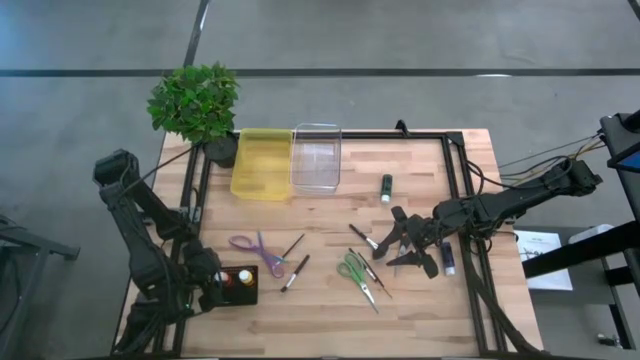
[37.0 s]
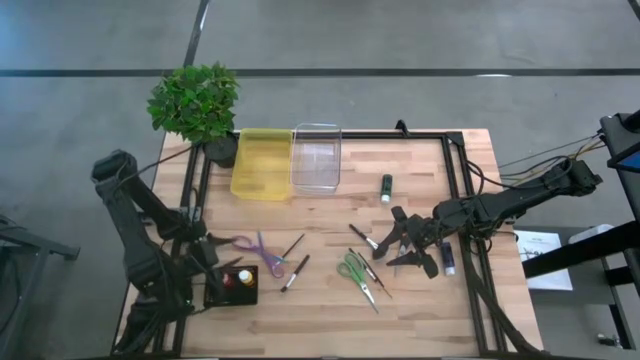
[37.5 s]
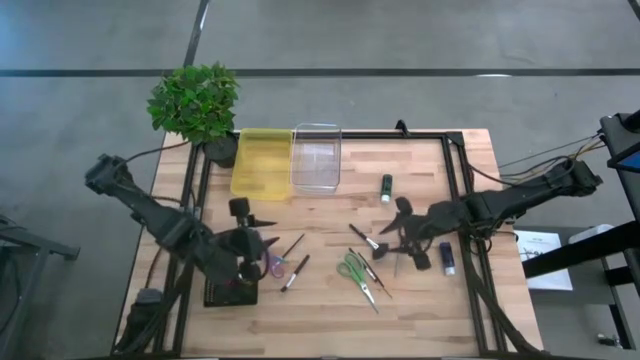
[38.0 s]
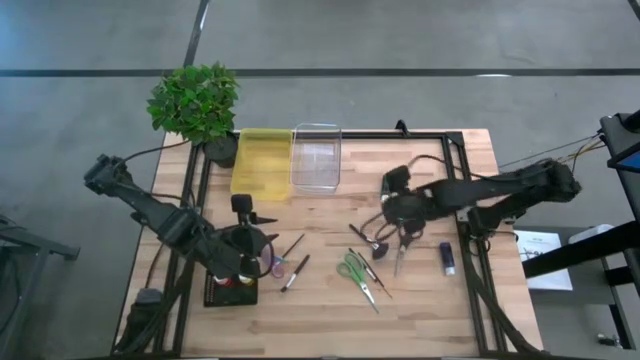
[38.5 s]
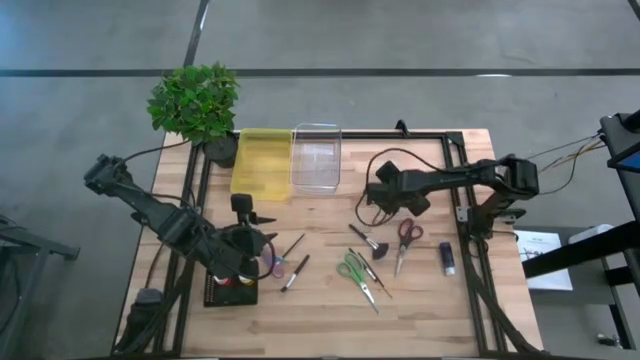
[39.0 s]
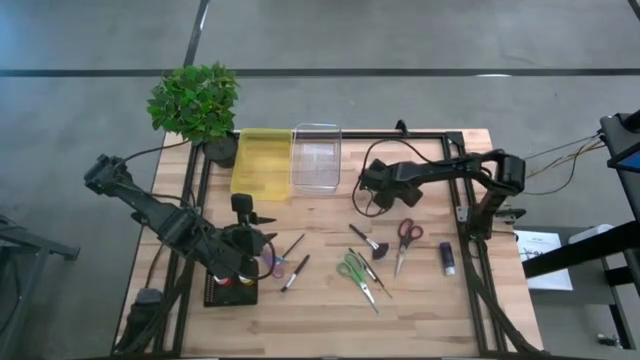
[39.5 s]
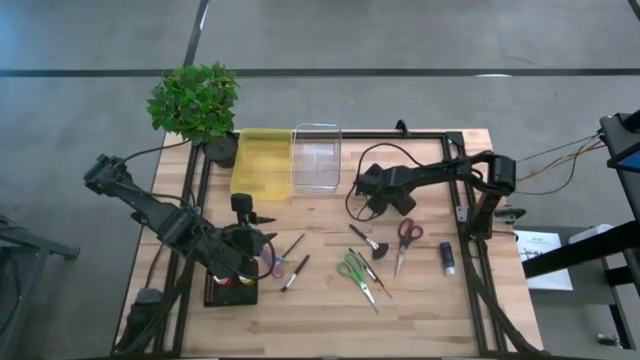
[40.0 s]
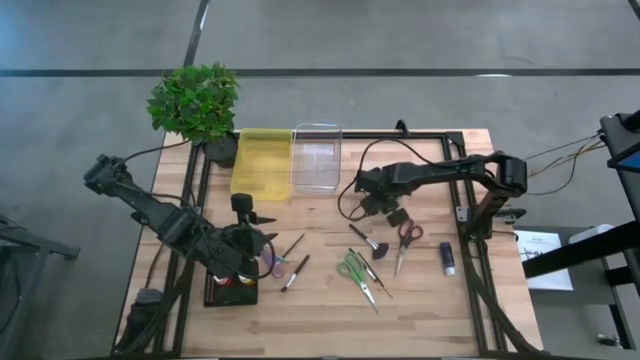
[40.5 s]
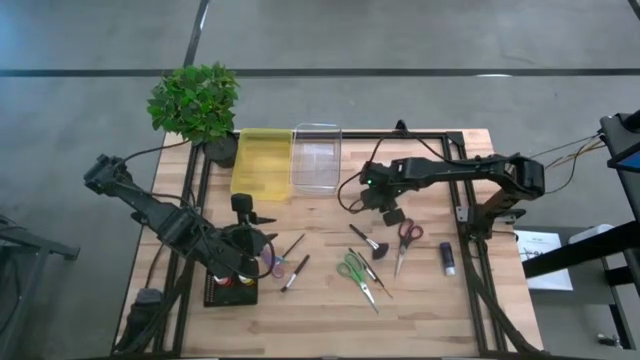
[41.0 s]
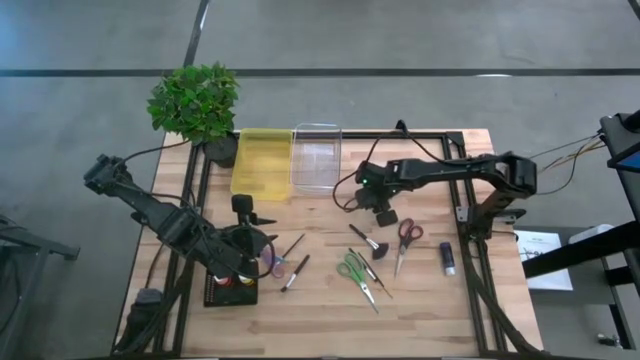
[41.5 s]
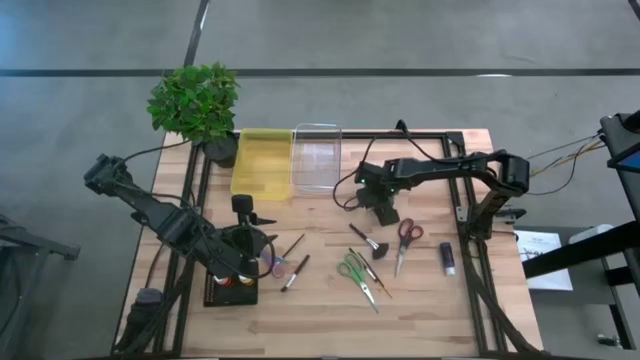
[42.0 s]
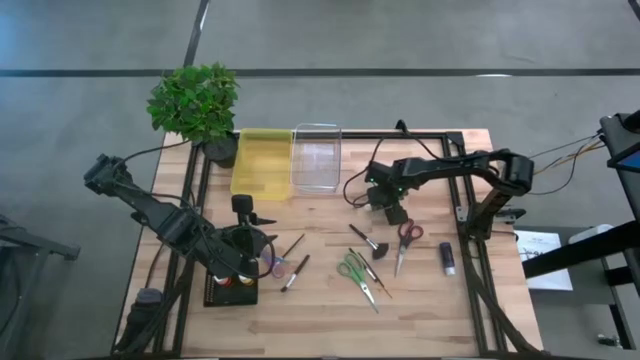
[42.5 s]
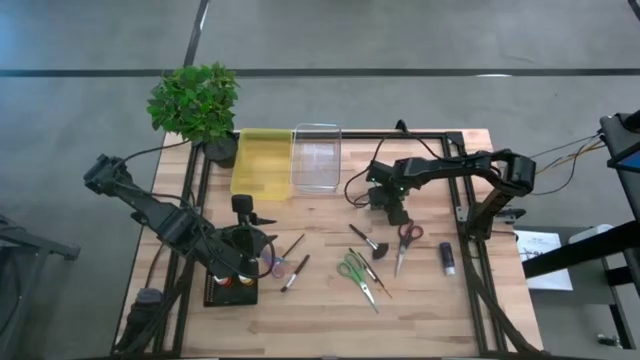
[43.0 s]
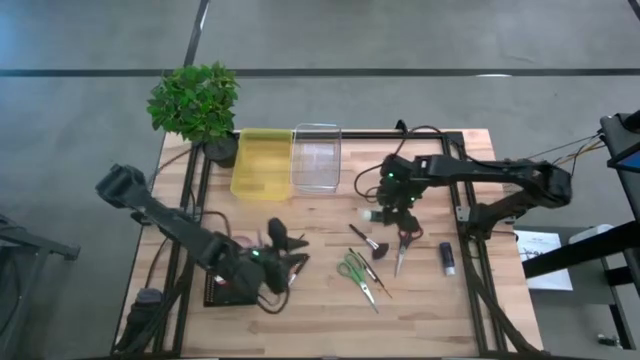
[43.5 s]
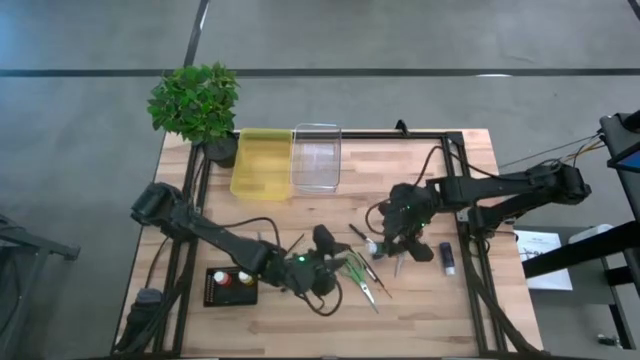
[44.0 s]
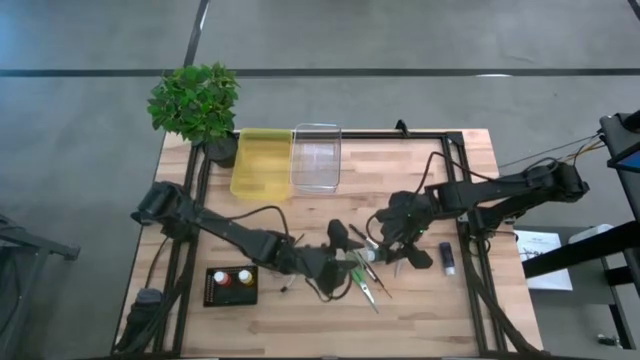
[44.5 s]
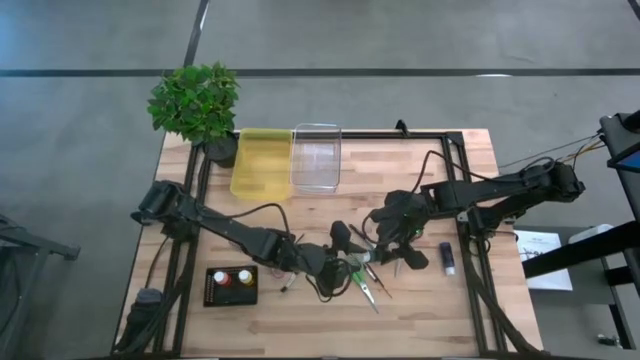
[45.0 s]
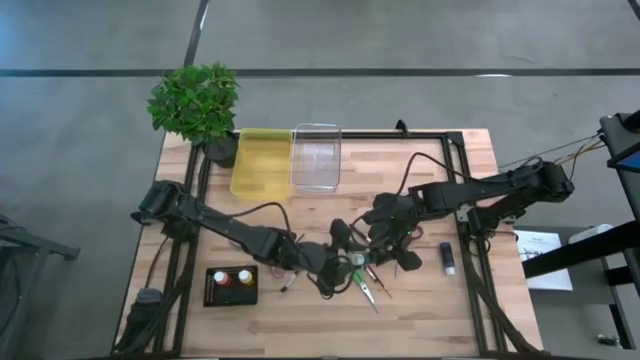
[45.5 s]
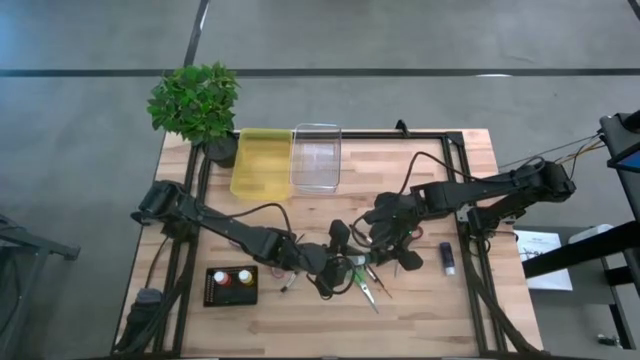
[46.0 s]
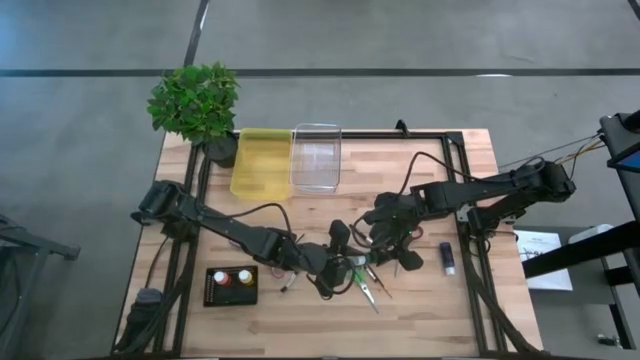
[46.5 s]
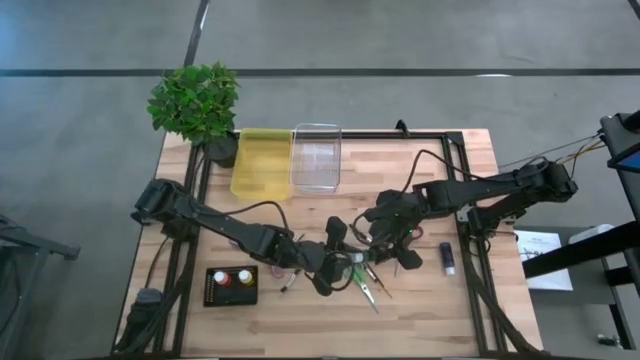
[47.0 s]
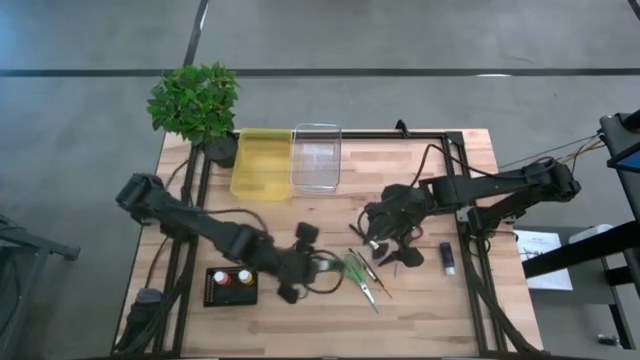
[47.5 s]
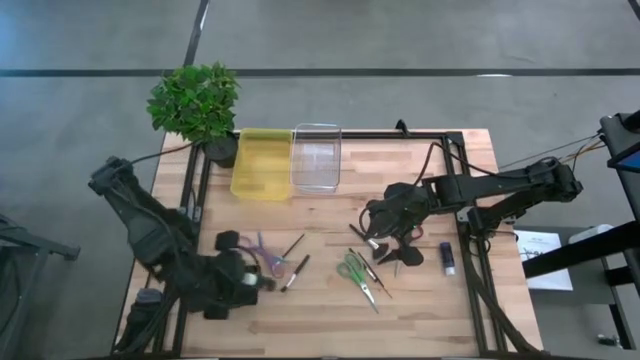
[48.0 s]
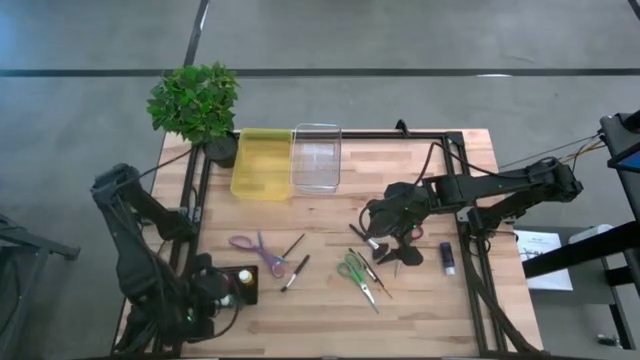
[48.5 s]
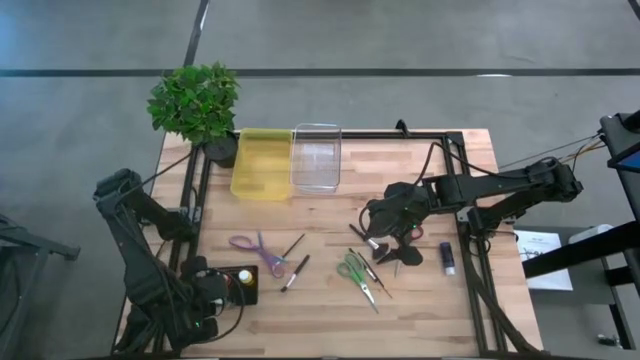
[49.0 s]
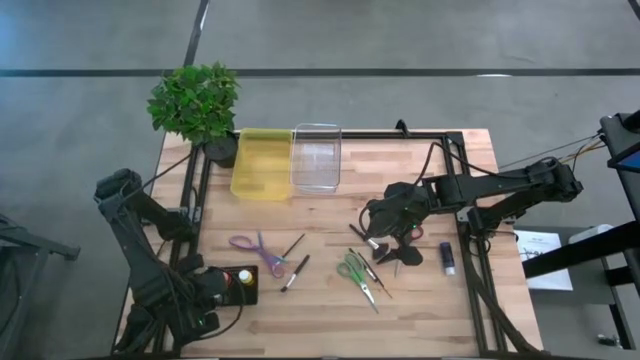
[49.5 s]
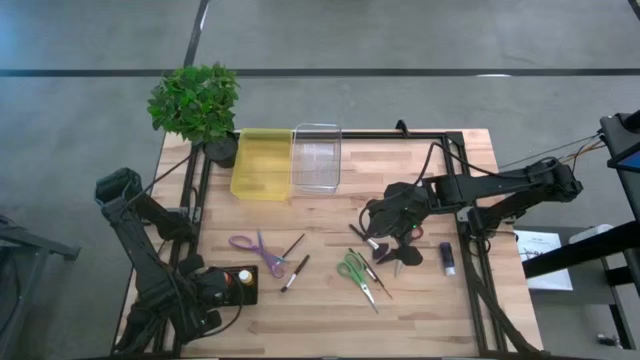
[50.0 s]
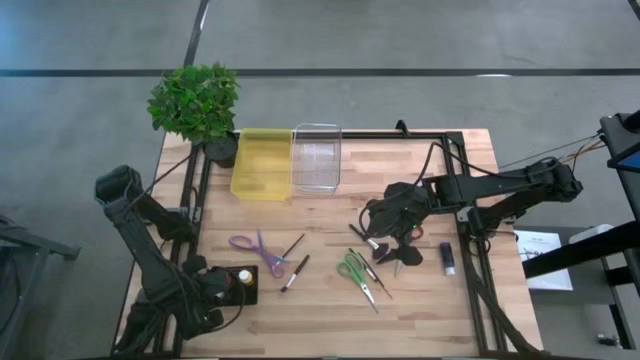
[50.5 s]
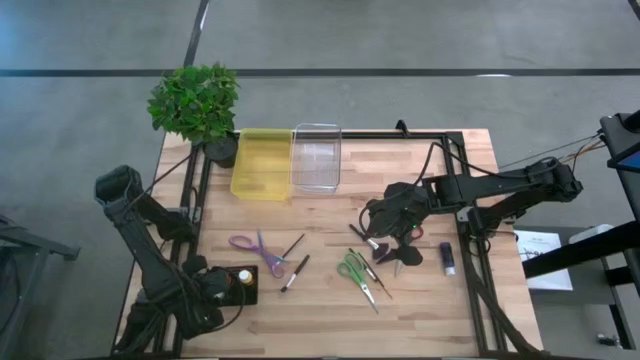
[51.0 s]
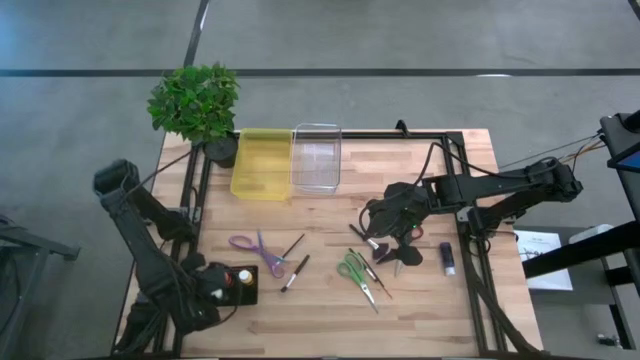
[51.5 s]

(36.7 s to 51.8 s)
Task: Pick & Place Paint Supplies
Put the green paint bottle into the black bin

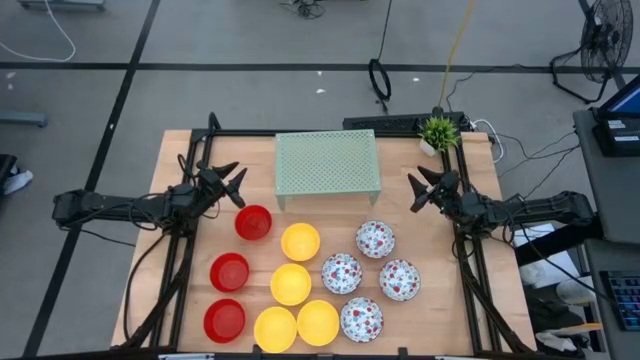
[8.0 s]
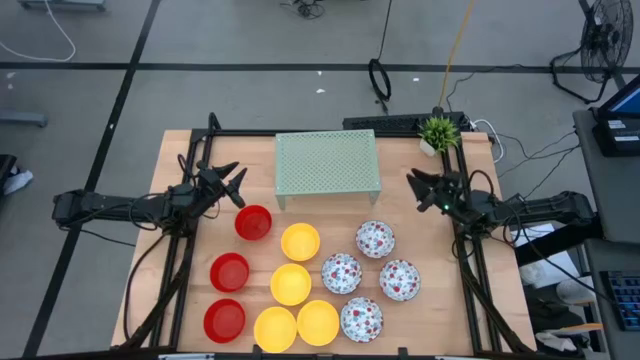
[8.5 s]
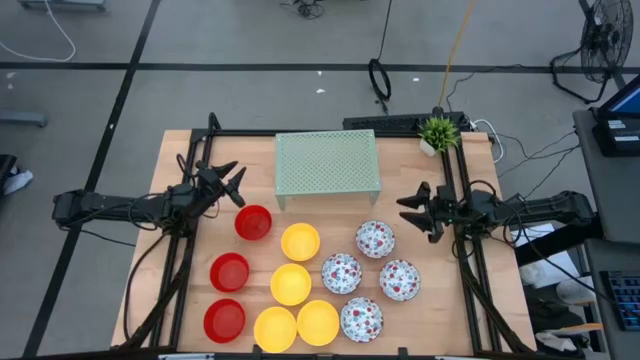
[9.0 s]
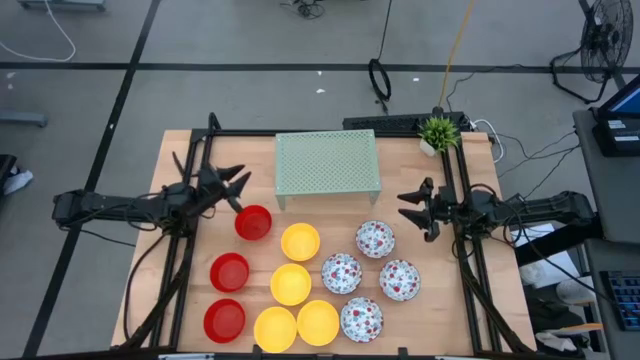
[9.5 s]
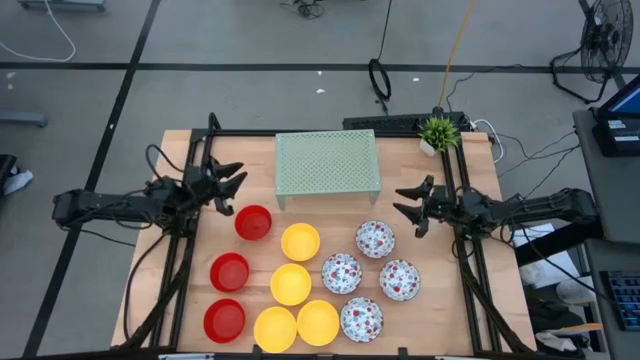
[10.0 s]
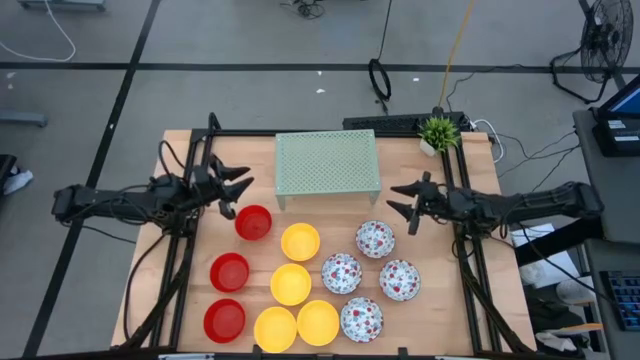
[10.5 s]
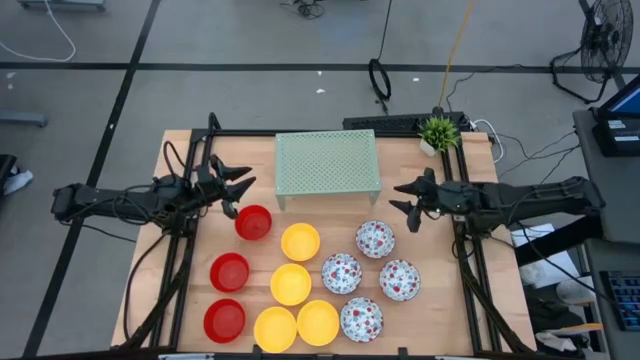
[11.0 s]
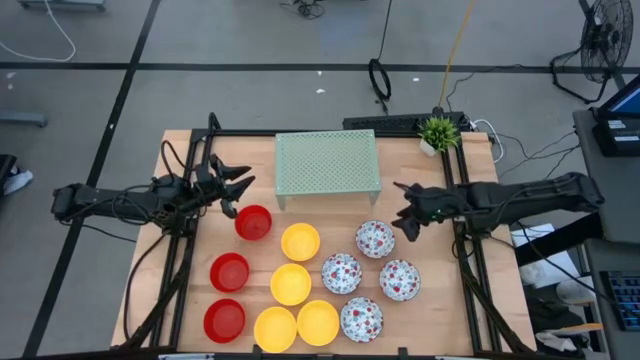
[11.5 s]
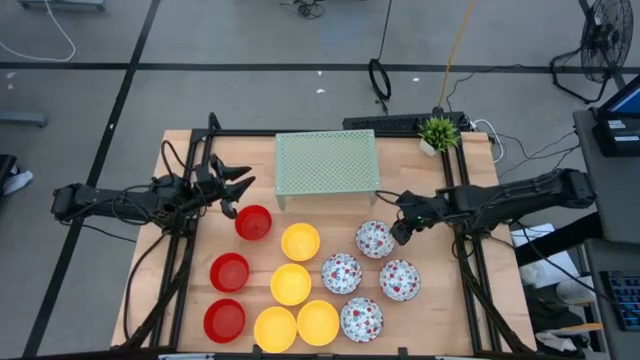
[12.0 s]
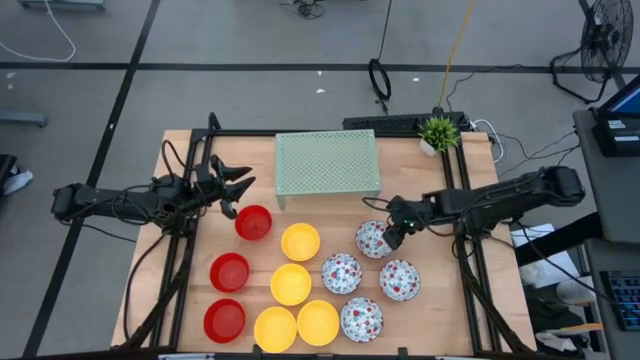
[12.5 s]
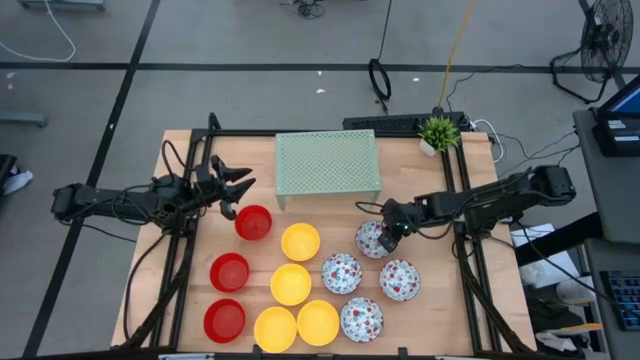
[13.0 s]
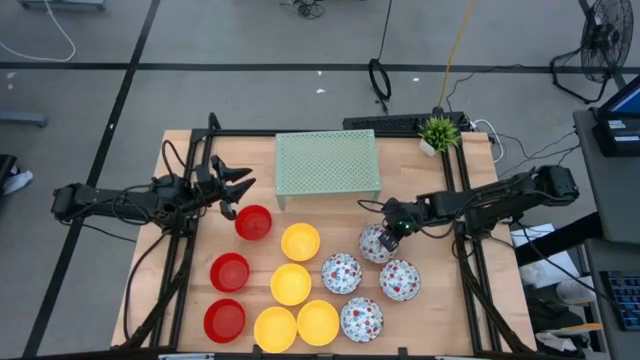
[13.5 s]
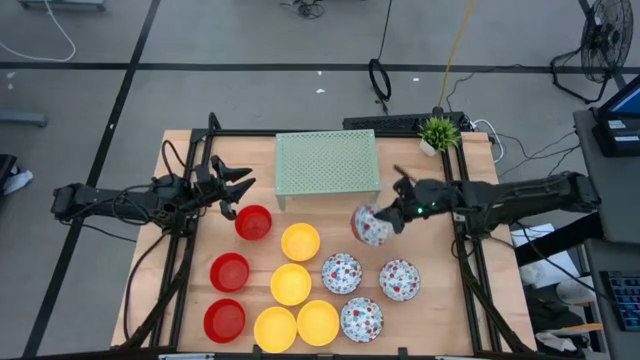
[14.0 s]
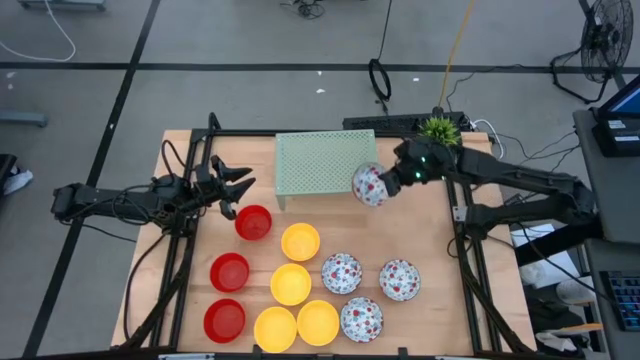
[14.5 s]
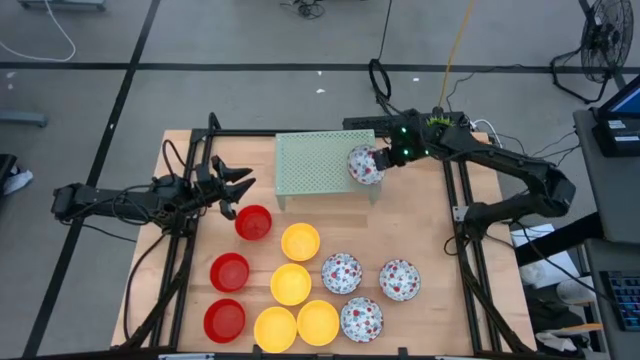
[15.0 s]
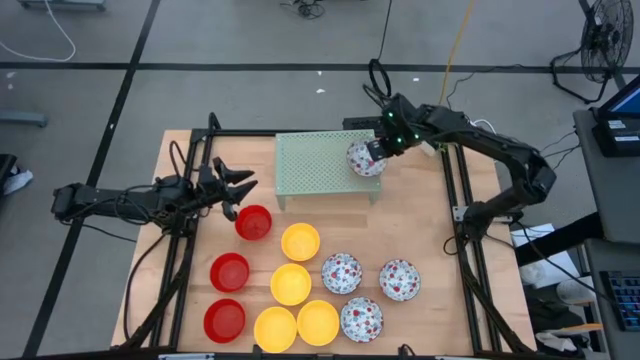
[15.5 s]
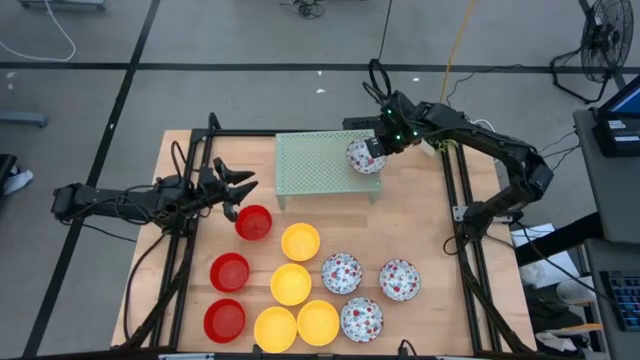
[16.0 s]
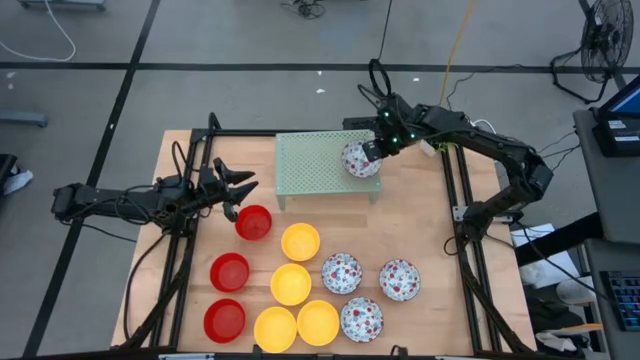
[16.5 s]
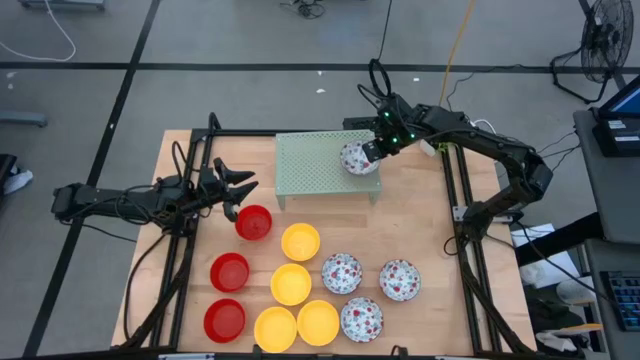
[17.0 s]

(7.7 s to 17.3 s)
Task: Pick & Place Mini bowls
Put the white patterned bowl on the shelf
